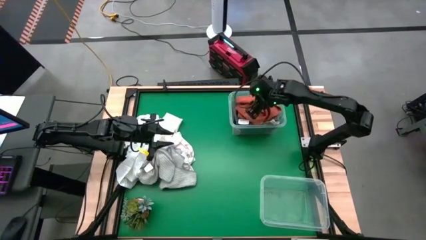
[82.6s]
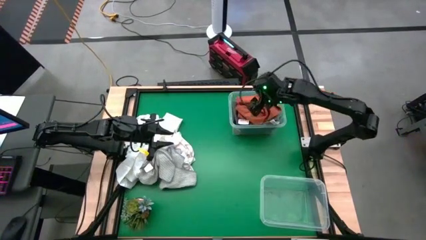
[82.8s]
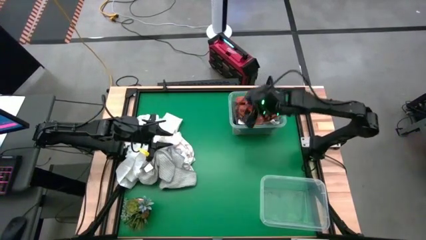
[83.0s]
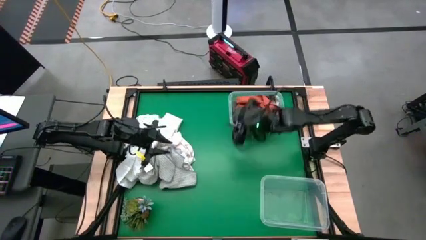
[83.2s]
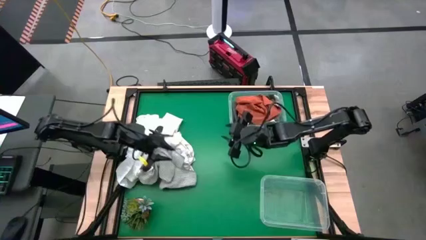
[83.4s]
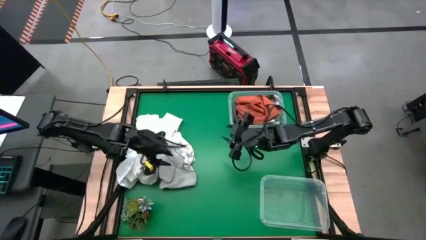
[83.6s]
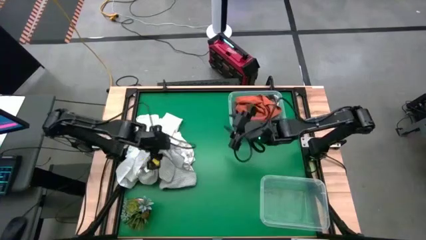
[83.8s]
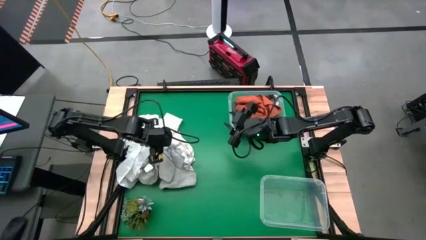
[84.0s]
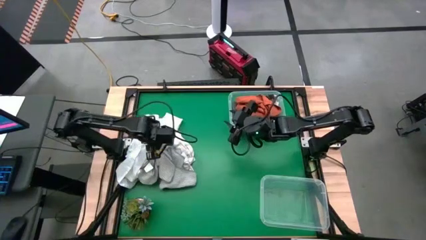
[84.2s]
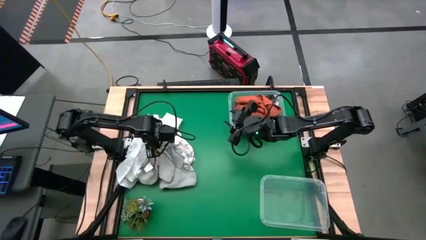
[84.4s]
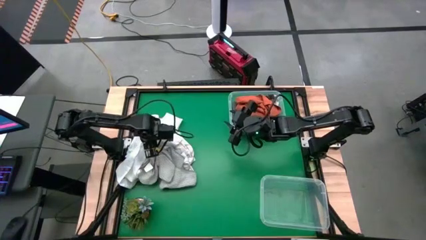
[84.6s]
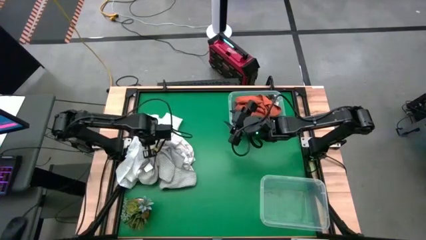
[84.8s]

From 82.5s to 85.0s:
Task: Sort towels by color in basket
Put the white towel into the bottom transparent bin

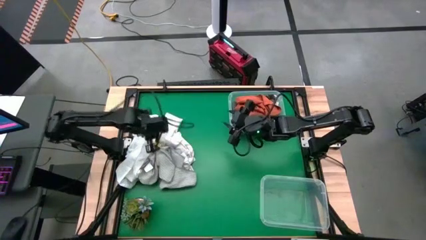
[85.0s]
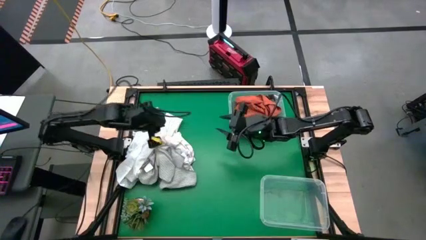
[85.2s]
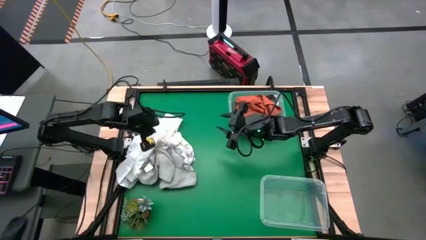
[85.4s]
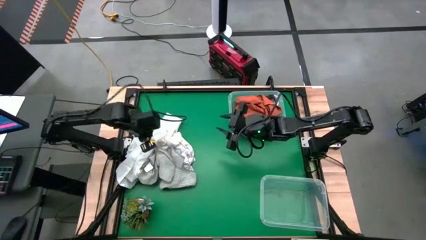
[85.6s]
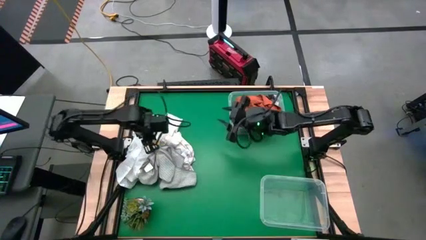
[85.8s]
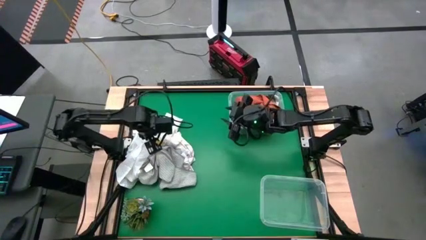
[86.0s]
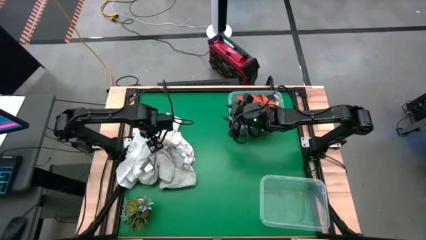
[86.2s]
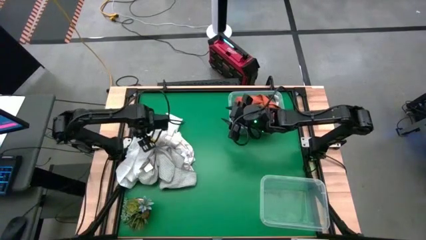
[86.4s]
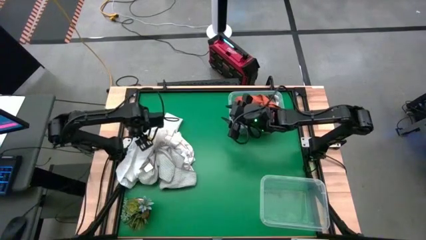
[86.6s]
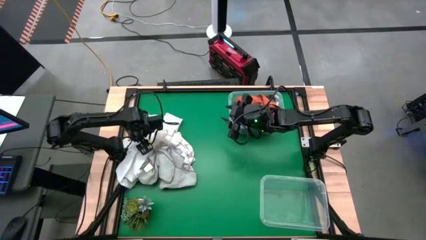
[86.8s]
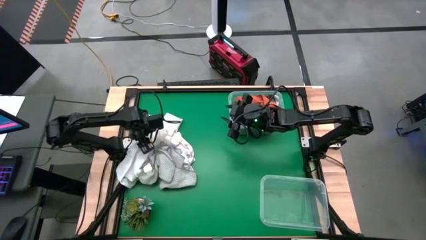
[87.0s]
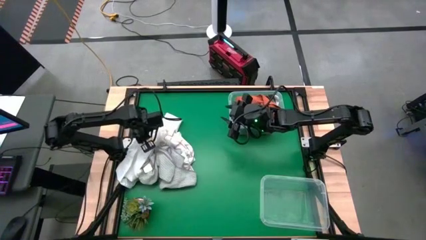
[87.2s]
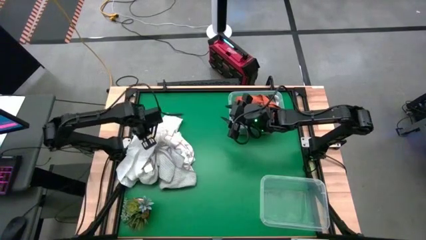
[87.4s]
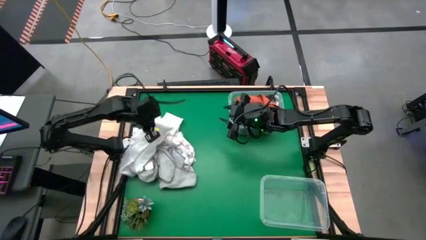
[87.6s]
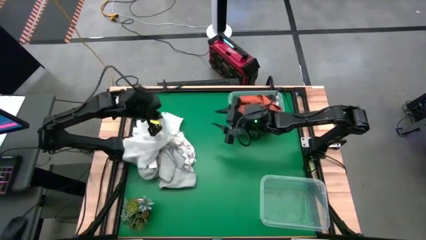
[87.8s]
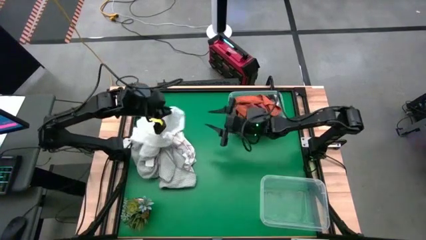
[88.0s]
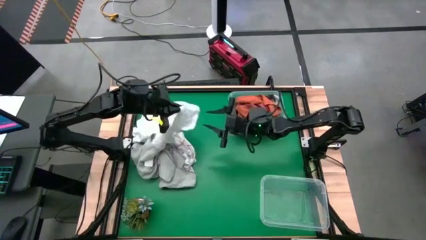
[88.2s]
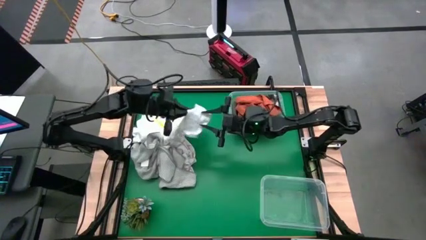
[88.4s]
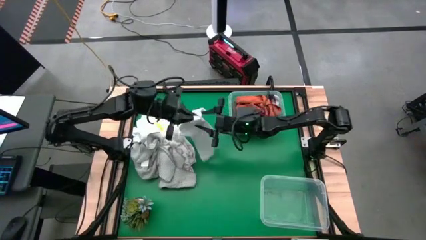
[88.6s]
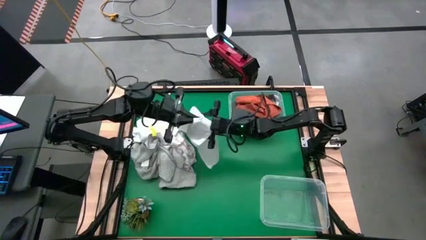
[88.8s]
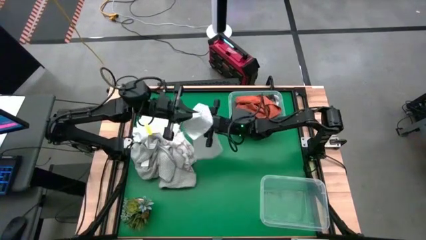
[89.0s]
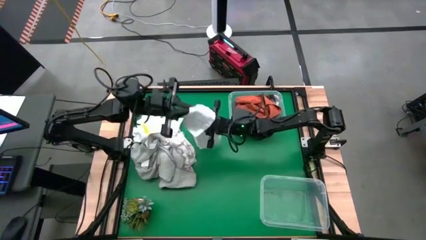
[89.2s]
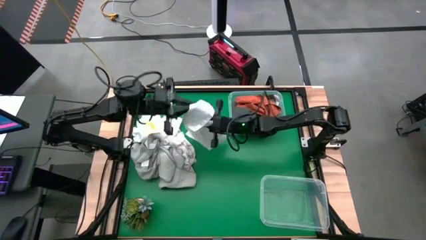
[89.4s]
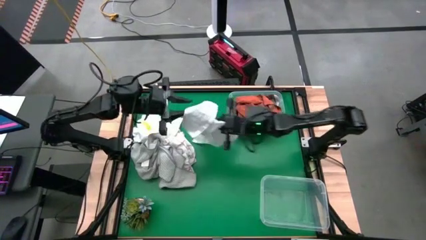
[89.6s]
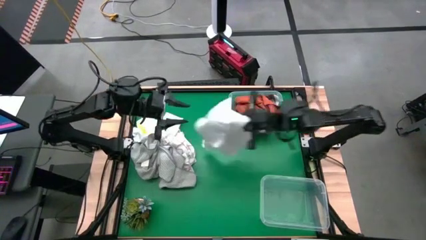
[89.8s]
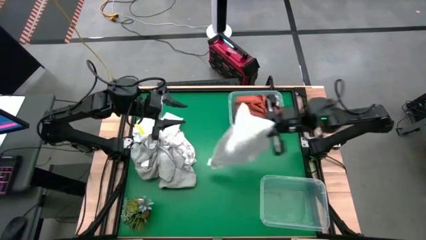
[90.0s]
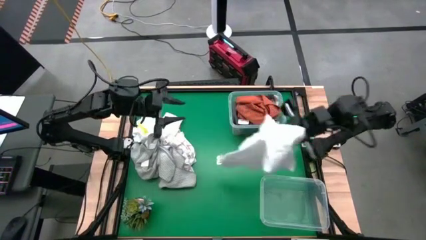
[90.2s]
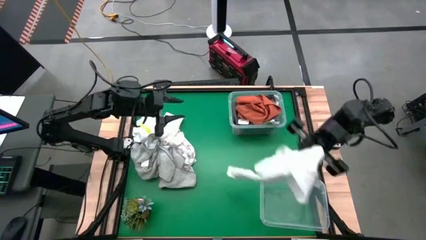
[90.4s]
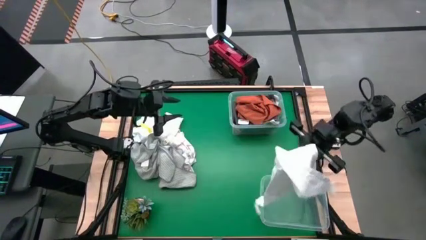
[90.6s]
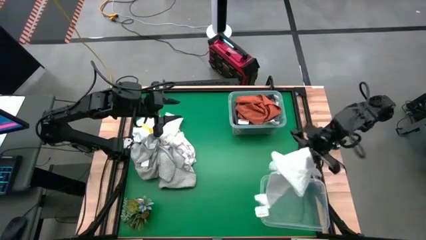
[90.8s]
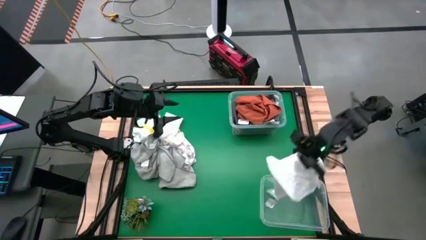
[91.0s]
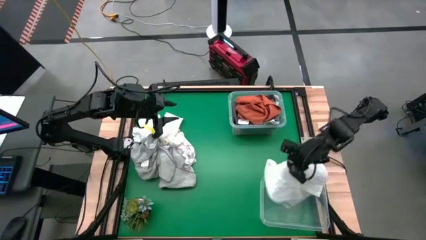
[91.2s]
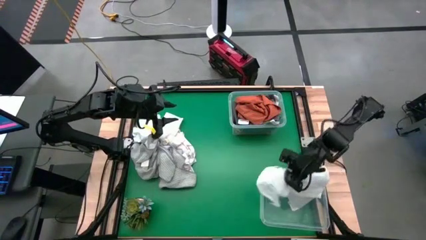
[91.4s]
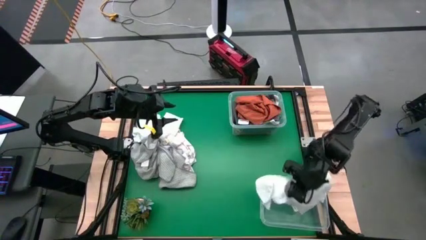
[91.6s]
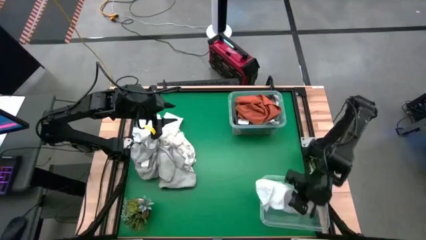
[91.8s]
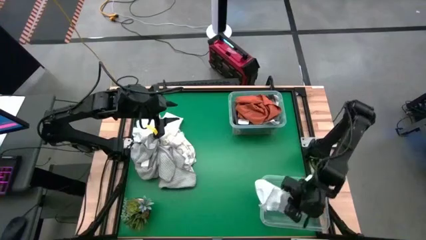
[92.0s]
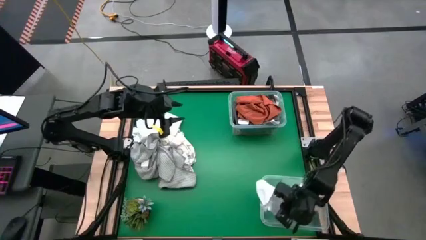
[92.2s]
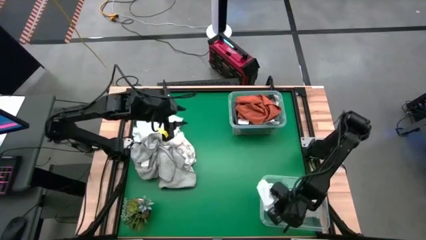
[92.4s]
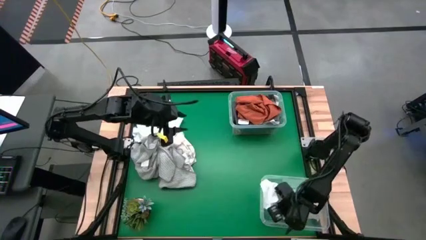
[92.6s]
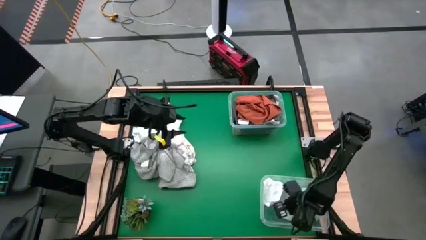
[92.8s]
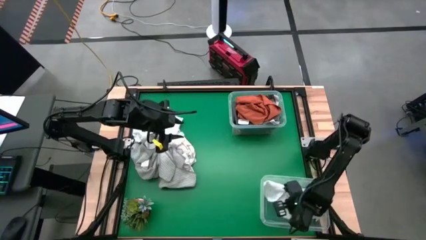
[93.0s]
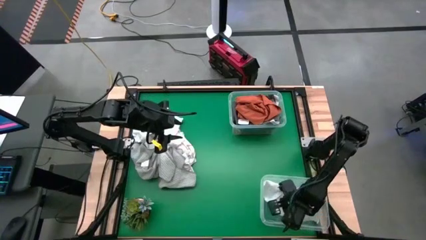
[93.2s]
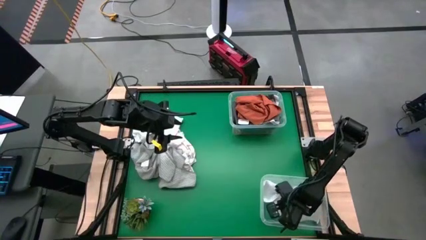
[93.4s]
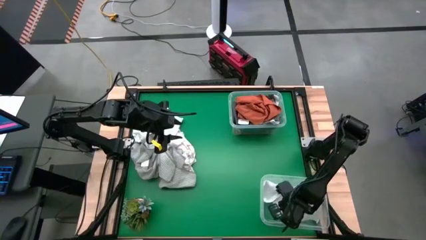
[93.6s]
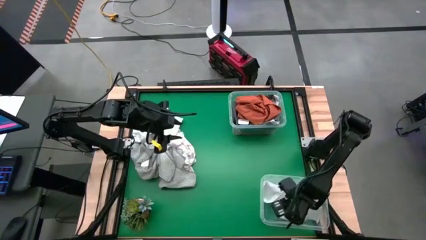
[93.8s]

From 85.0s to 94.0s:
Put the white towel into the bottom transparent bin

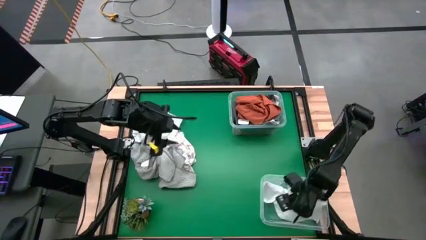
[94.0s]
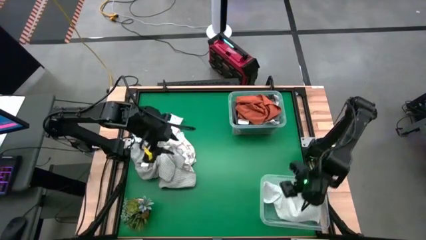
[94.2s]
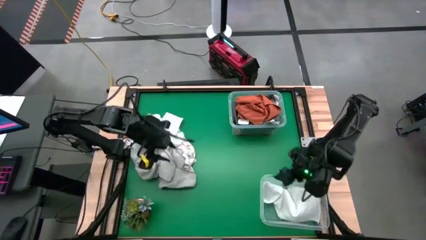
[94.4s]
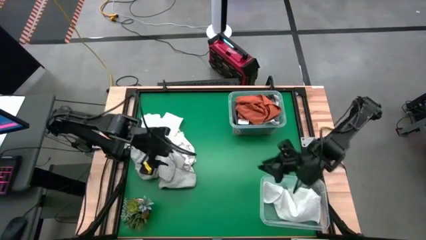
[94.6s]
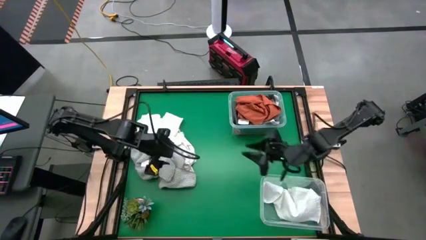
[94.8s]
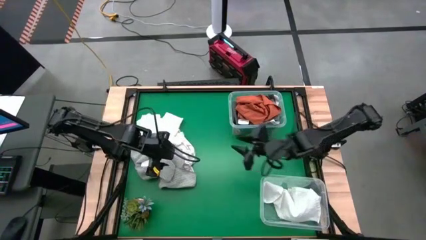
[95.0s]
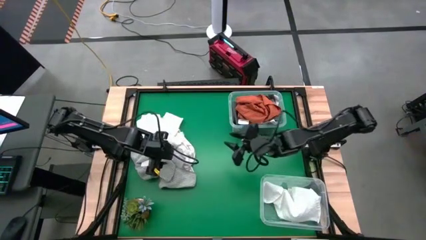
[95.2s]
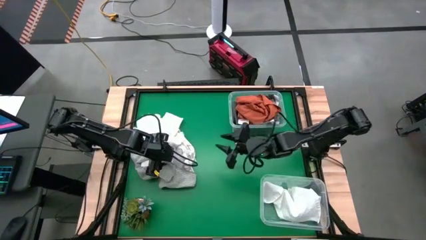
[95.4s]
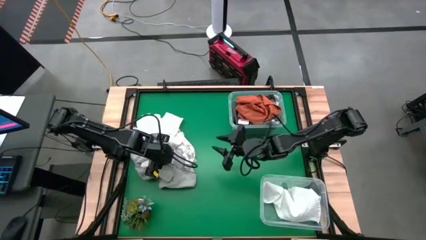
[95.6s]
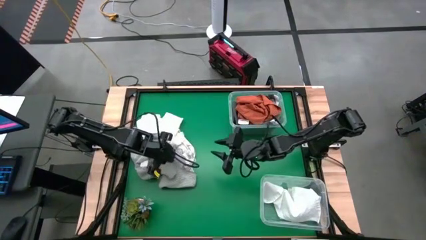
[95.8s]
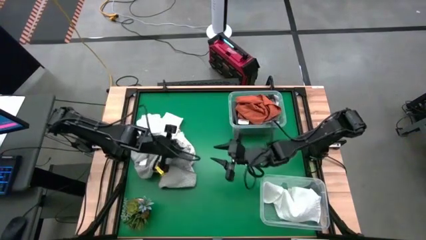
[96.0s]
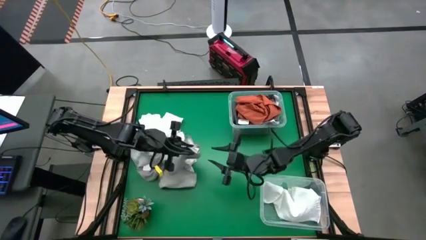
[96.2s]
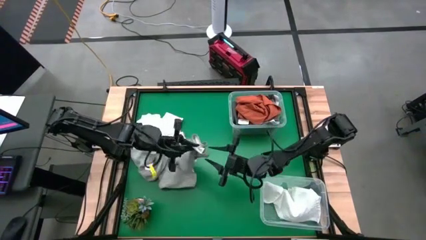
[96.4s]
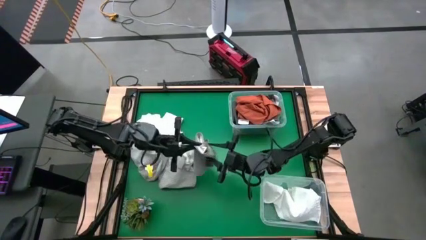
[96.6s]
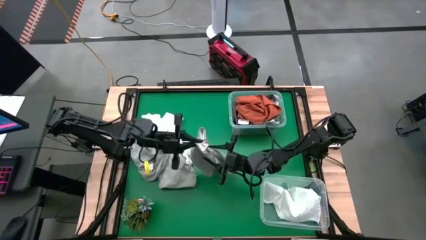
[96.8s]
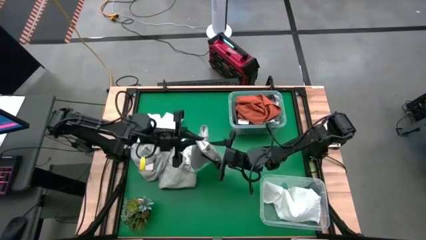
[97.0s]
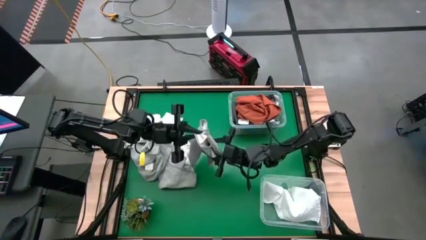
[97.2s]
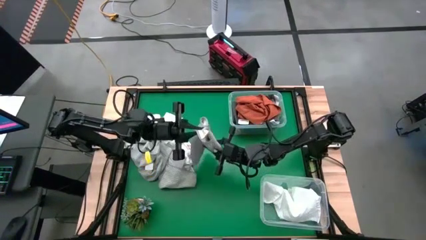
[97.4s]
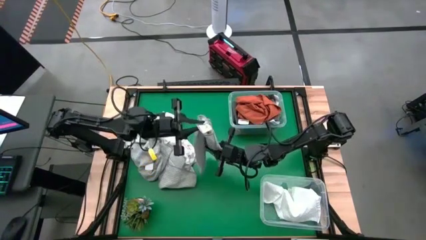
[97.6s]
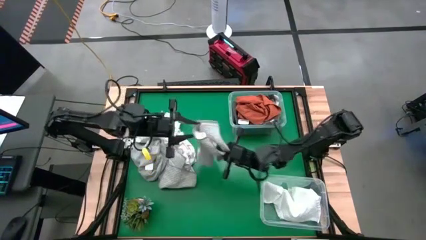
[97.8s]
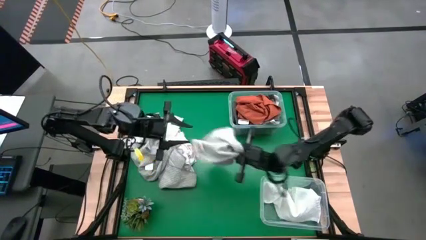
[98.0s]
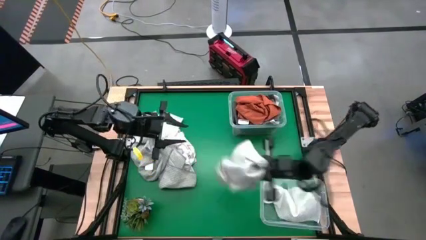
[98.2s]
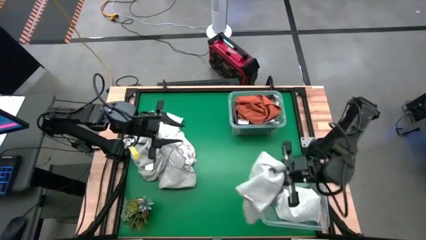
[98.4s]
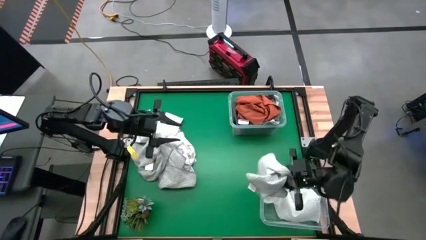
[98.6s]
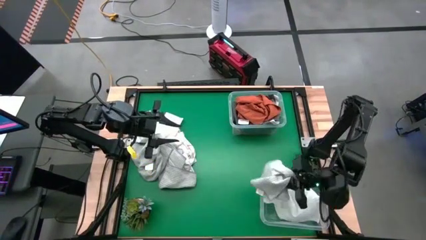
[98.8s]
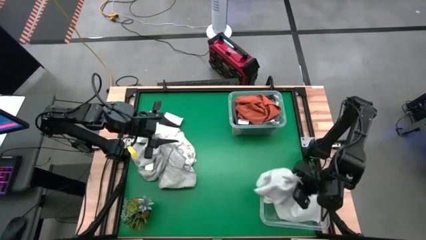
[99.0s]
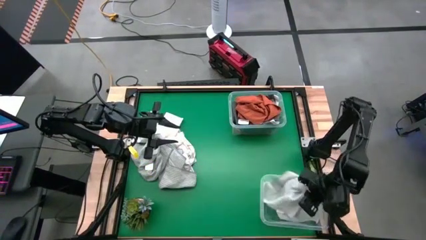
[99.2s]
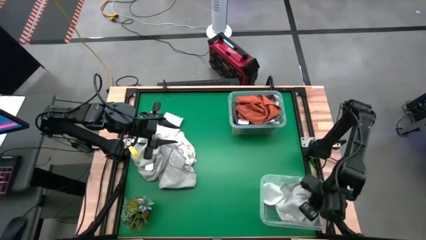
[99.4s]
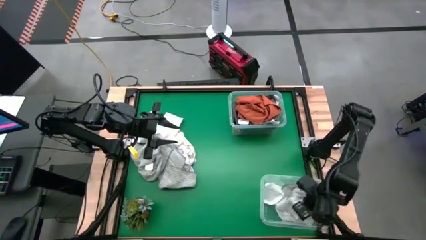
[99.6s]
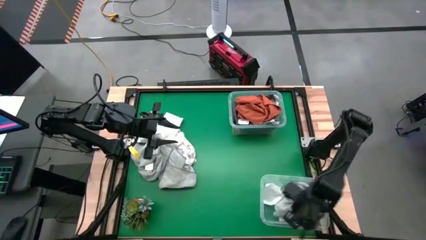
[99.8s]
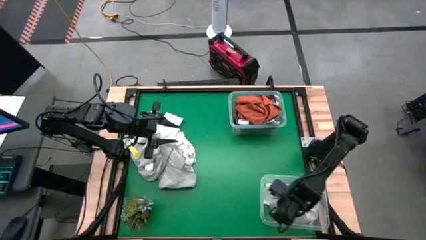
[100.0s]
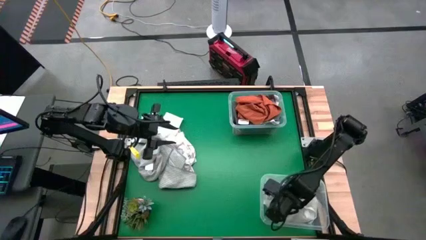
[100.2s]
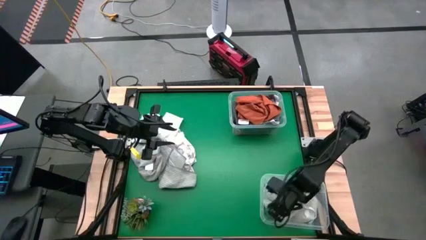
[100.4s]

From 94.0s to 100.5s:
Put the light gray towel into the bottom transparent bin
